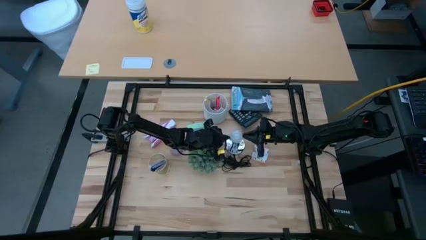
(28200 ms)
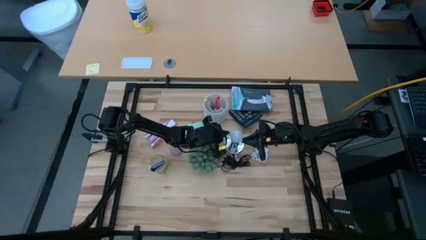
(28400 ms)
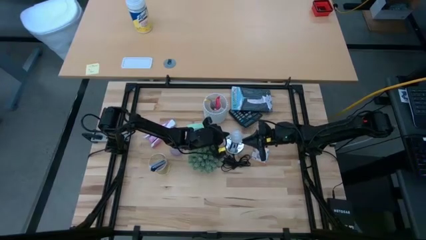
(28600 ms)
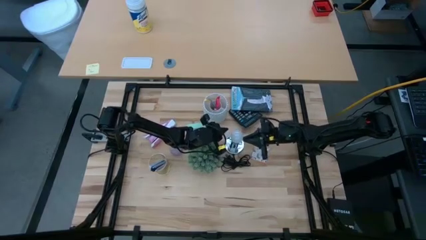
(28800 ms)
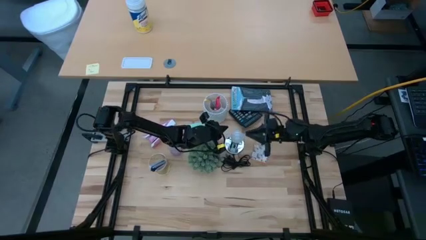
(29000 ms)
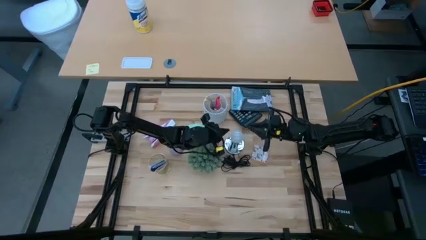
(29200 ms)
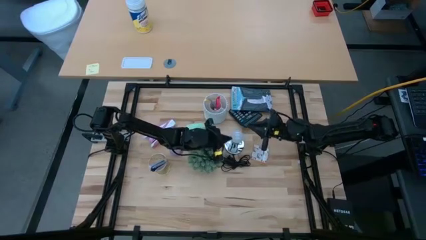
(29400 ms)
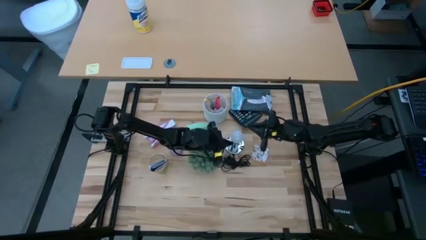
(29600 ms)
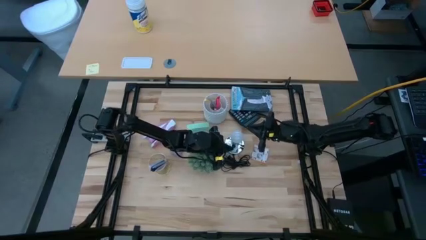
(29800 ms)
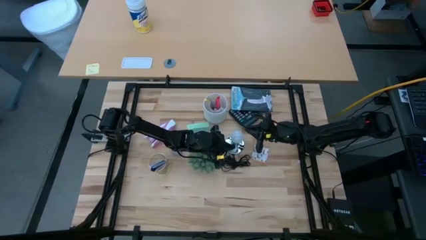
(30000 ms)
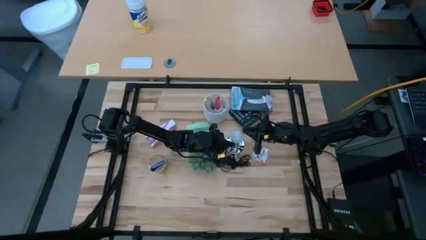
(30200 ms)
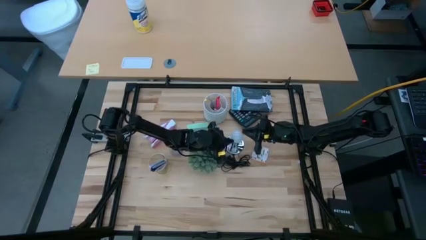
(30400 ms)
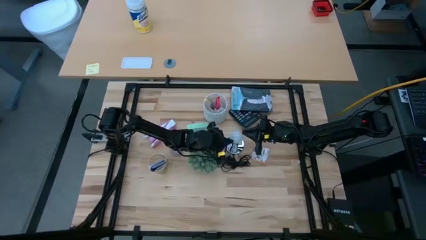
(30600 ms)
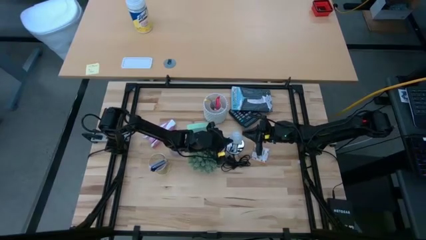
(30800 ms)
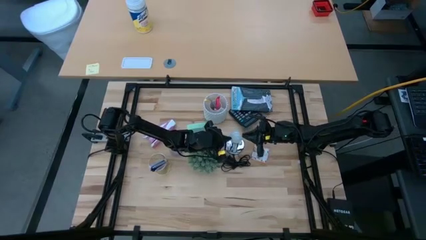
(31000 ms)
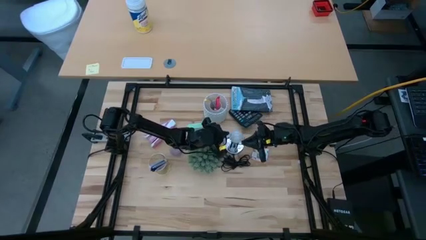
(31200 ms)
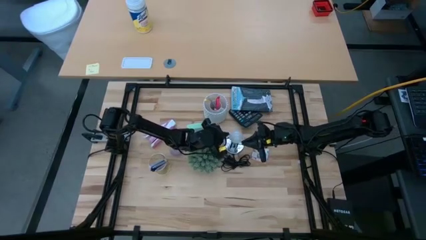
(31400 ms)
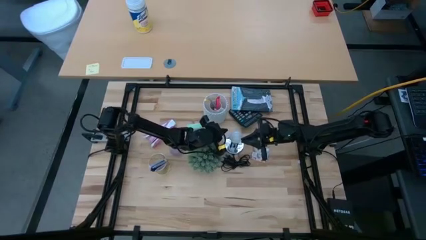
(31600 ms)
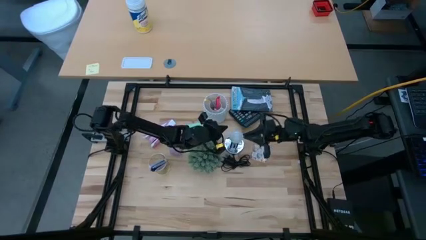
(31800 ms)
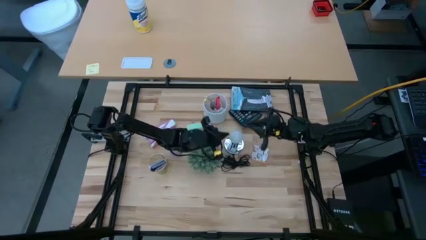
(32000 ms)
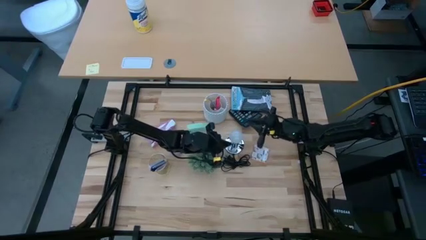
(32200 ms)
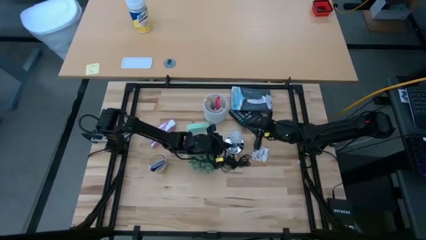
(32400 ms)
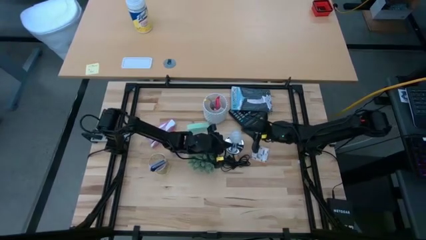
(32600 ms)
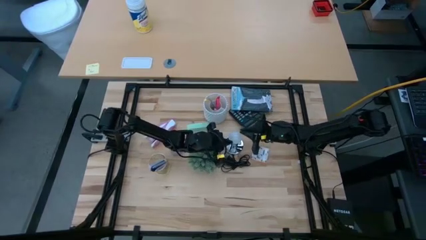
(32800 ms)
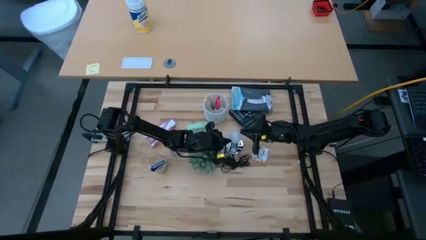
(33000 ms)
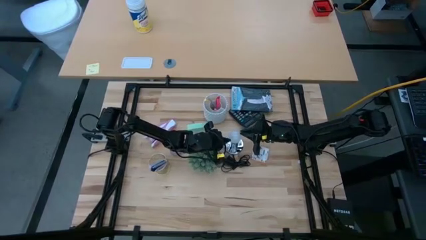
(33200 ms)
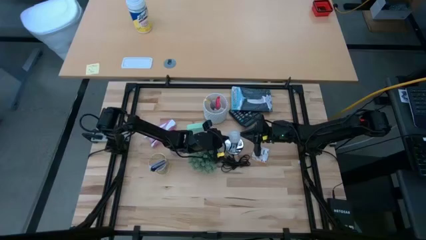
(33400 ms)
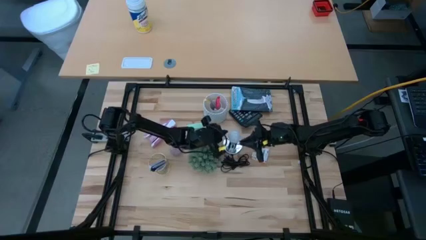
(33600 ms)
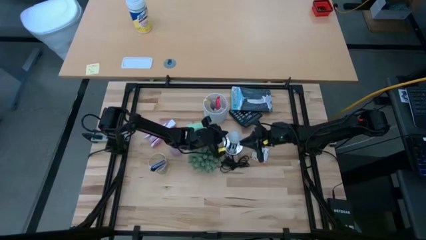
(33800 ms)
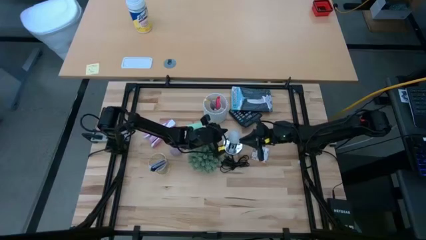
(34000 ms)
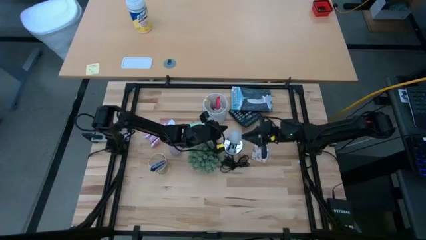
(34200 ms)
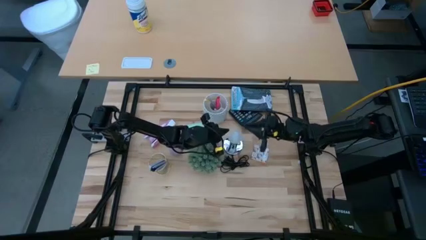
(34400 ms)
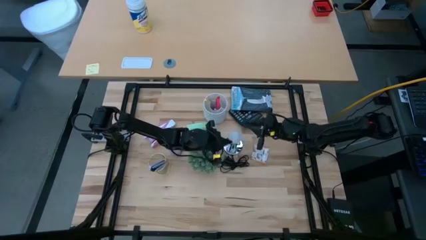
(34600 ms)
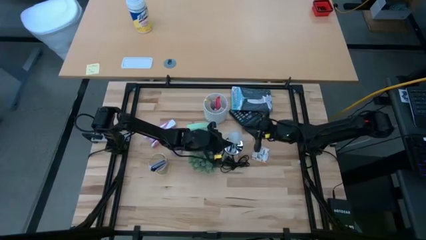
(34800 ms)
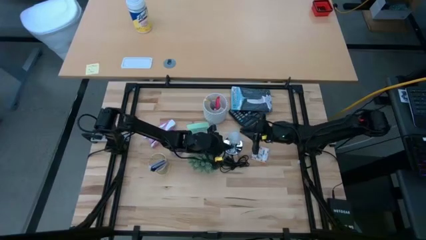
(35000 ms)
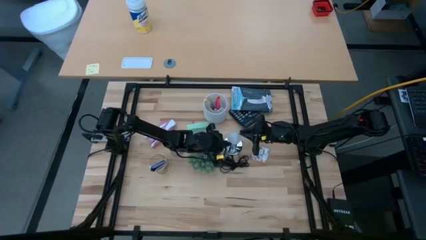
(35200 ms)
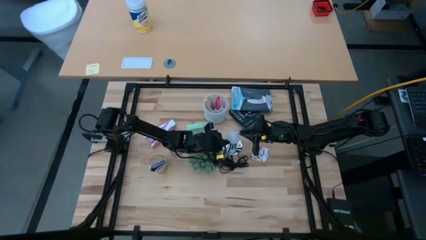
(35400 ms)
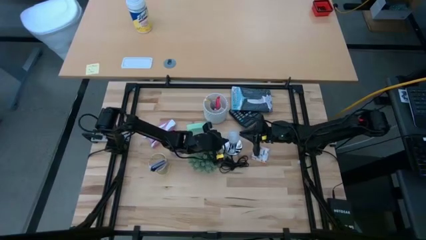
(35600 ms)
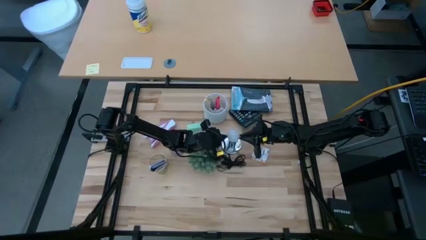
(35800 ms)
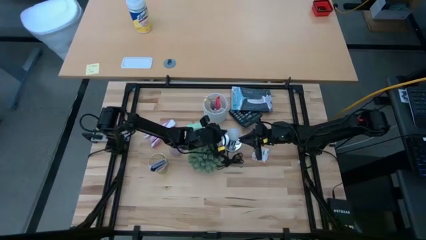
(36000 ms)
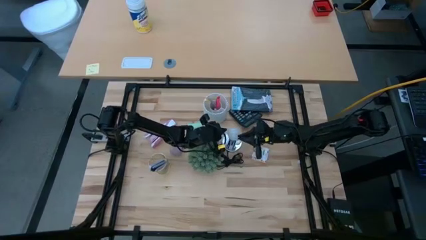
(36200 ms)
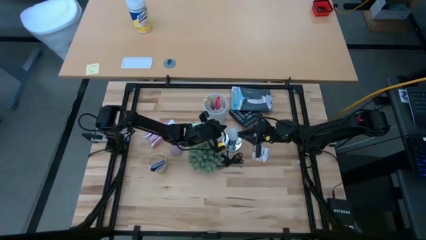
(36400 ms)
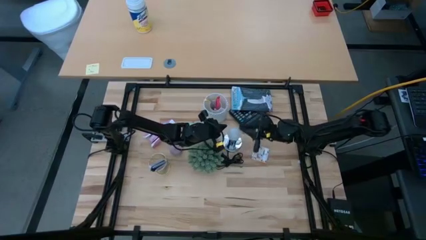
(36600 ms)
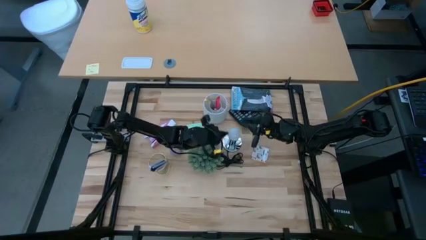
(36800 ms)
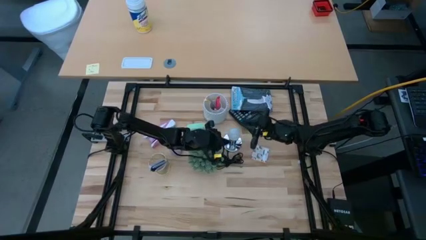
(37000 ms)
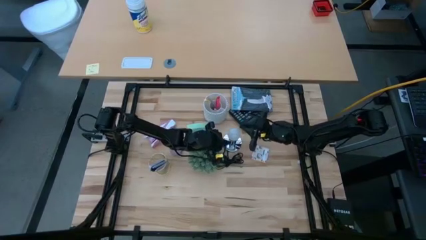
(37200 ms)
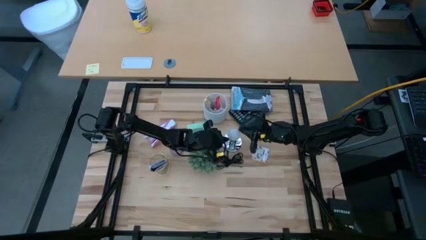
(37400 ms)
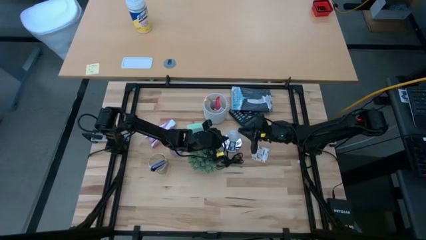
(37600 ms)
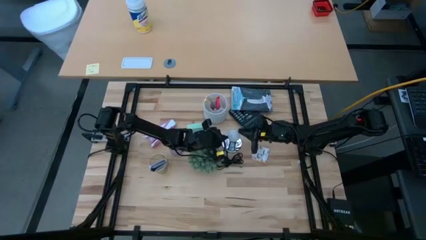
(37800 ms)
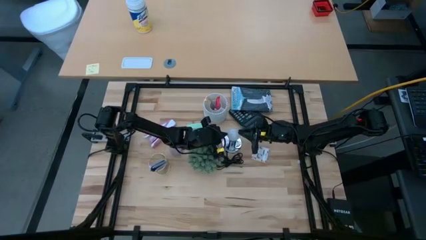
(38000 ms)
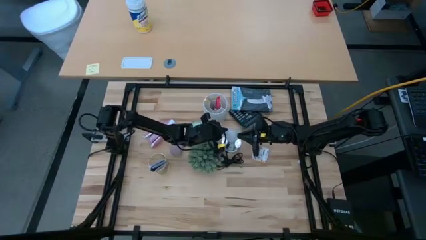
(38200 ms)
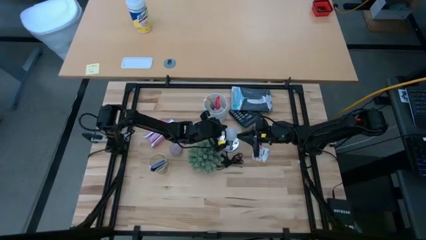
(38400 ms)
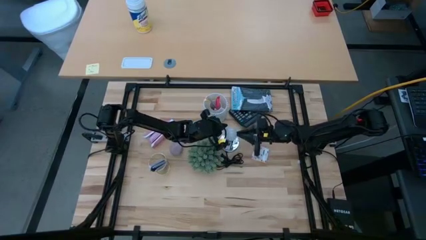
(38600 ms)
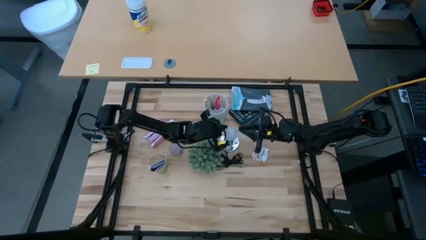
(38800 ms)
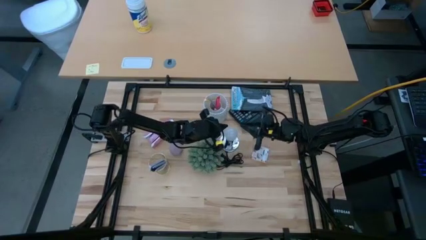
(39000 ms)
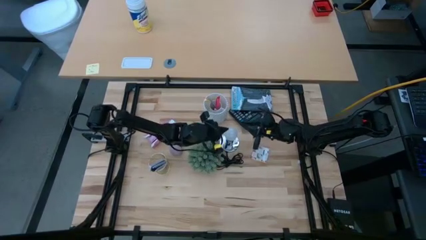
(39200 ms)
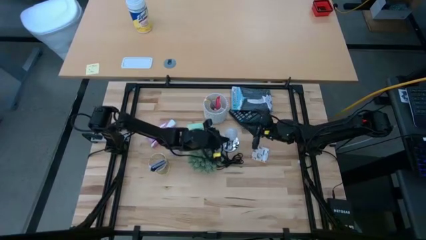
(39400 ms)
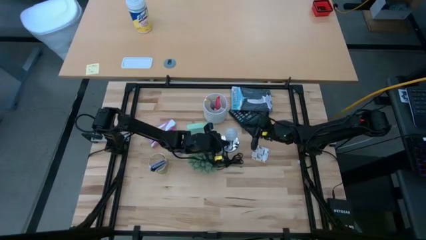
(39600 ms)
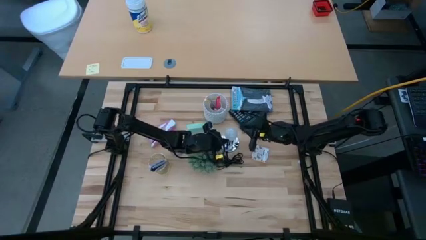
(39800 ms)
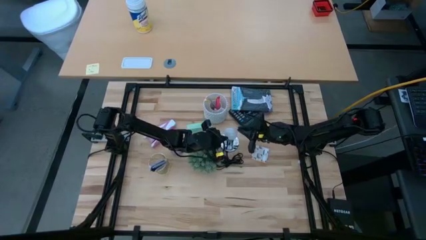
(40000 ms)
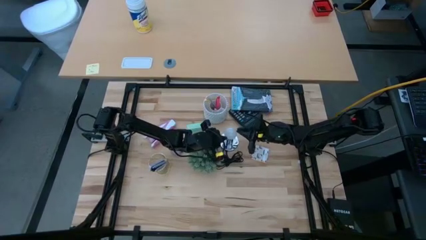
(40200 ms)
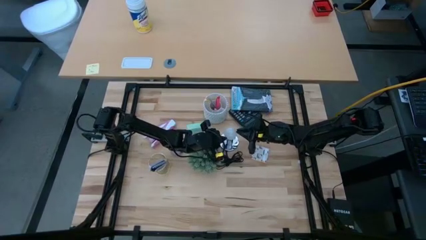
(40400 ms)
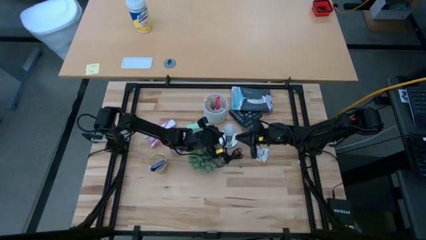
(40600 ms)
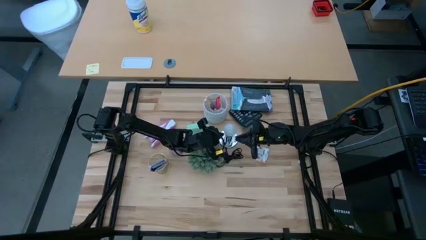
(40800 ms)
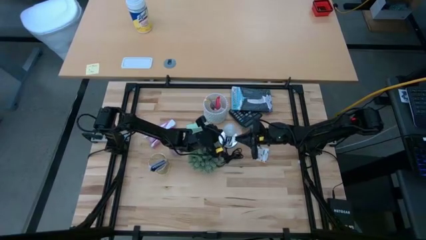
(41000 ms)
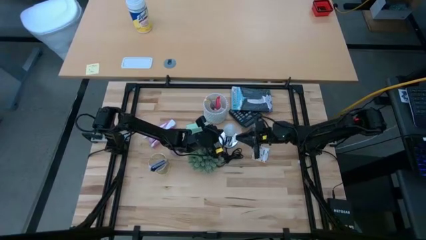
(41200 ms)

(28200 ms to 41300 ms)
Task: Screw lightbulb
Insert the lightbulb into the silver desk lamp
